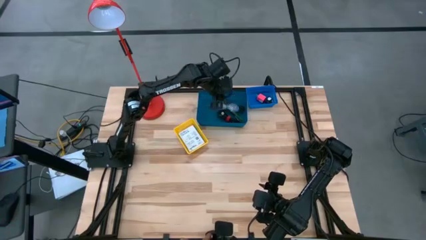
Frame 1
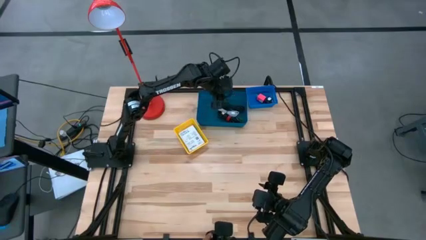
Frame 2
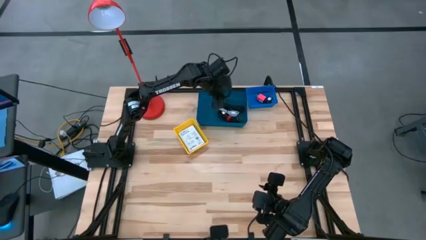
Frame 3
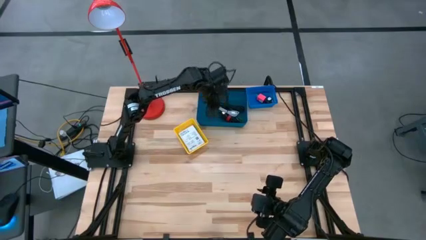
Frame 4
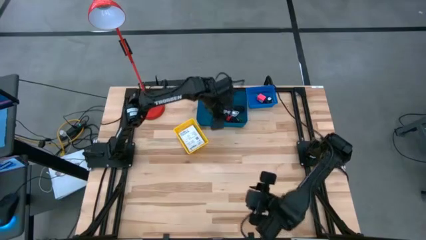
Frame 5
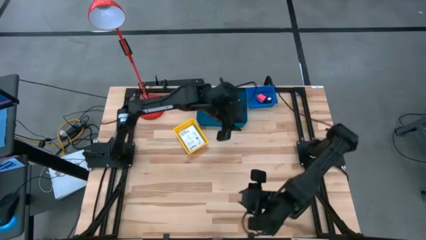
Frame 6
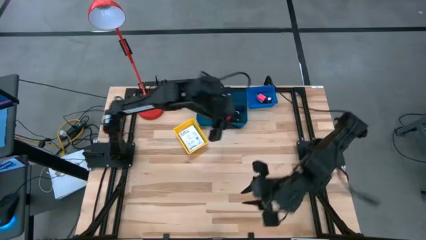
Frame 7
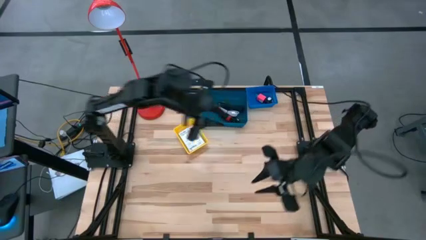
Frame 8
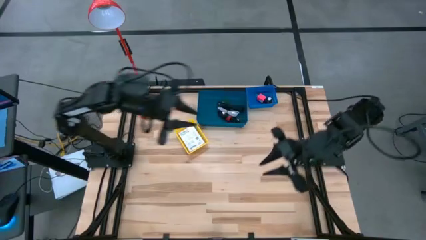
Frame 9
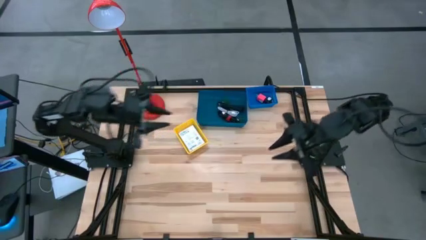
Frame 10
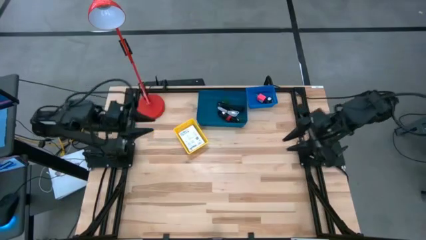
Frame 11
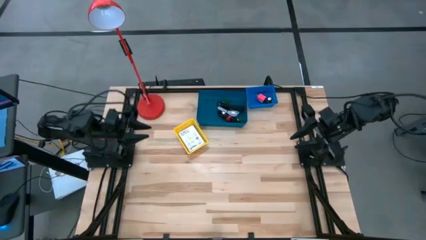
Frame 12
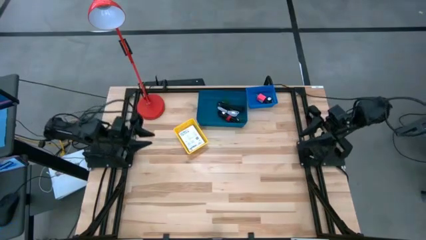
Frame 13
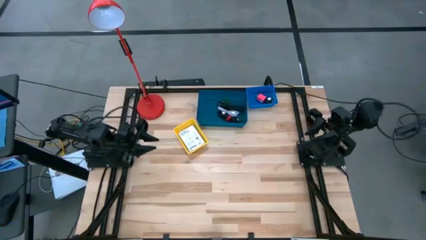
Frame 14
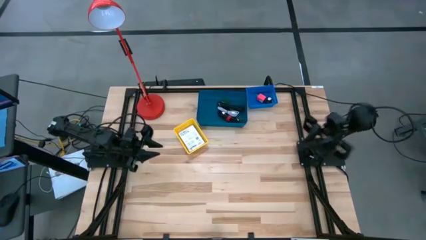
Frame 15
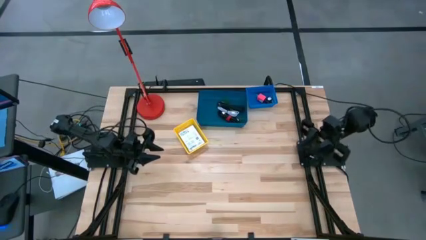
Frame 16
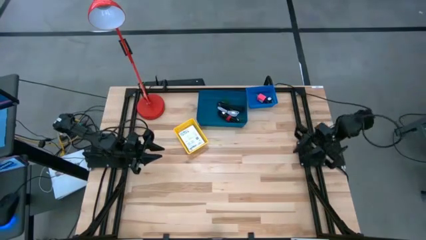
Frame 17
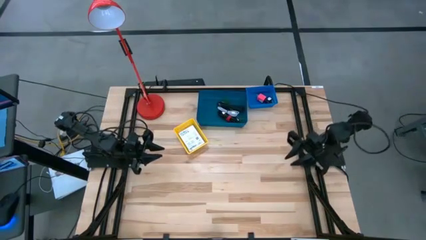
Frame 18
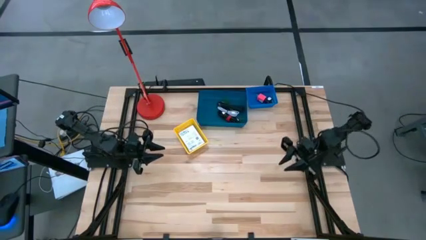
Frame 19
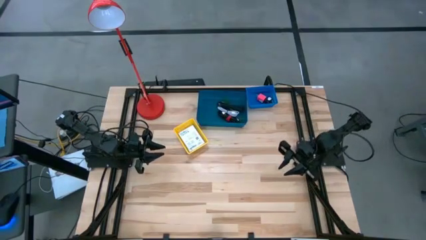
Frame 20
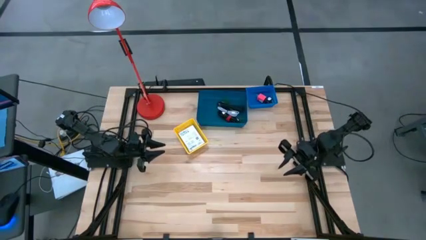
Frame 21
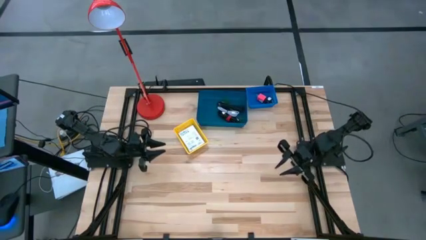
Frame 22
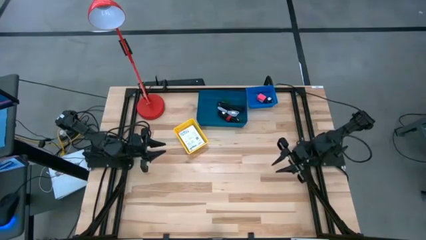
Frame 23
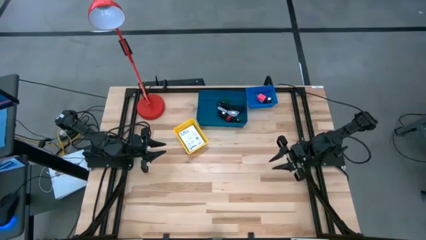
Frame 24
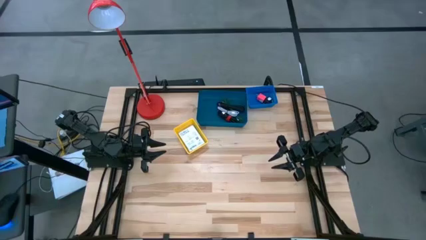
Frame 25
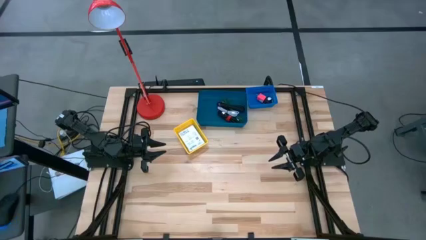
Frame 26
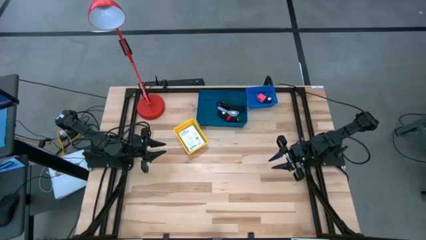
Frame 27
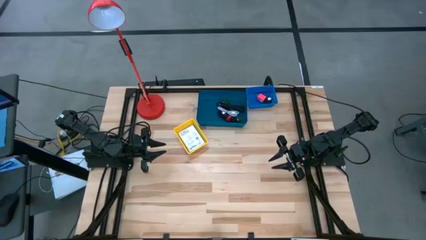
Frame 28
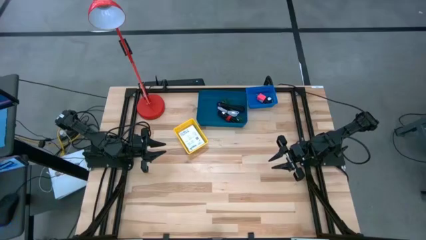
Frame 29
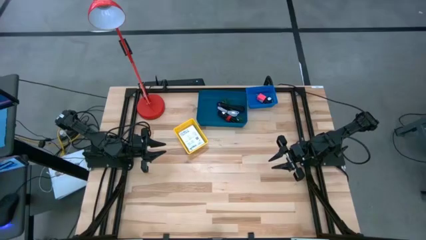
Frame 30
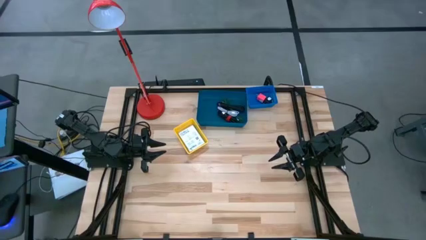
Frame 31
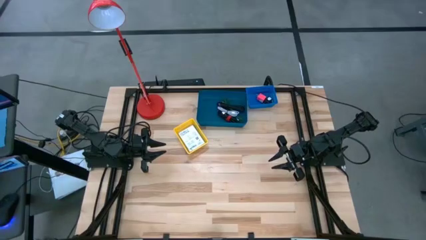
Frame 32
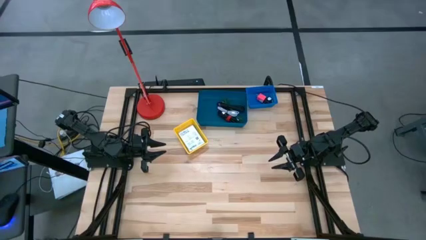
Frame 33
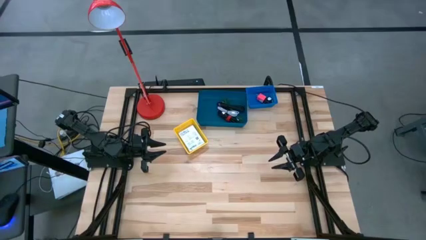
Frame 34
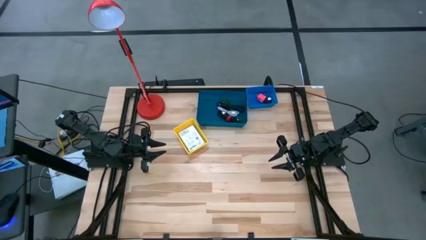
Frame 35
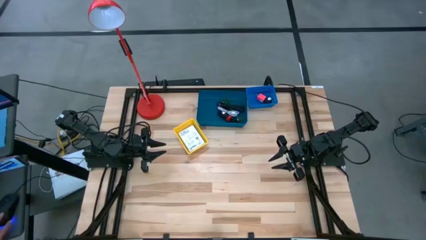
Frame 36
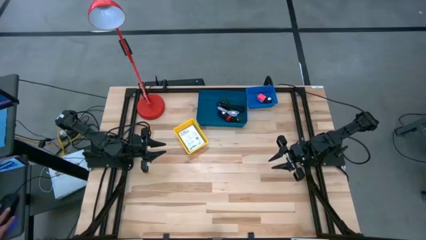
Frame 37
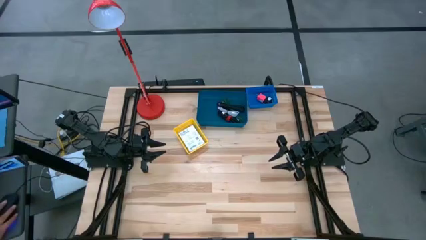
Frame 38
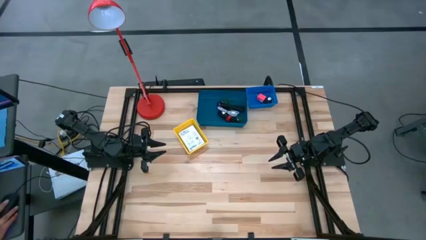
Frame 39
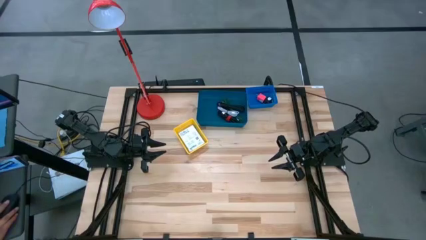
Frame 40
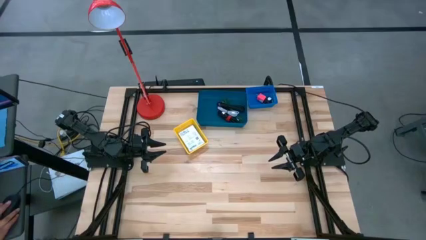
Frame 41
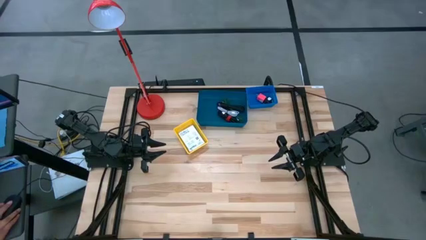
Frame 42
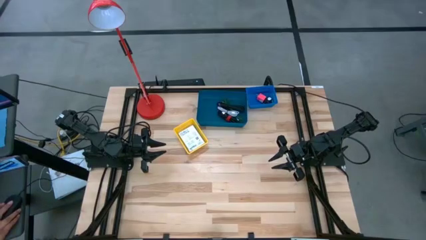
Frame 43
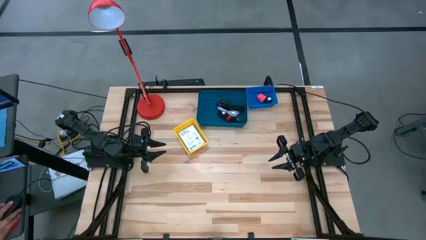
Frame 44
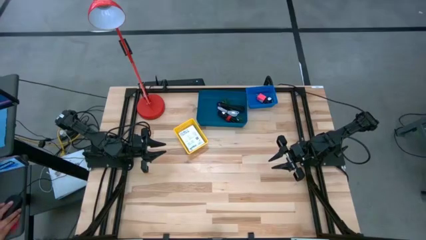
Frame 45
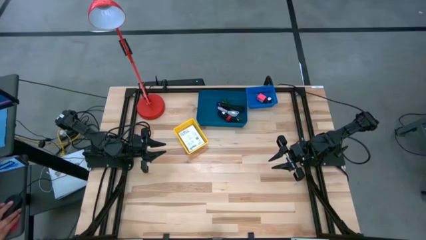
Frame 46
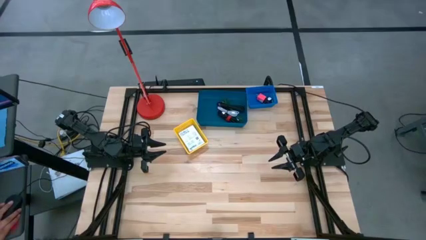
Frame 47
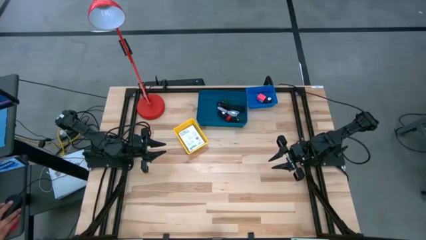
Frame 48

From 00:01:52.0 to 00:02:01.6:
Task: Pick and place items into bin
Return to Home Position

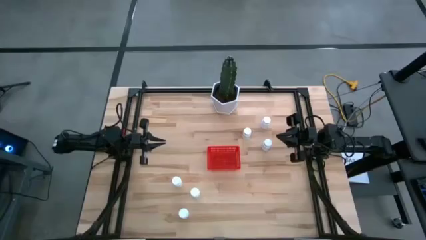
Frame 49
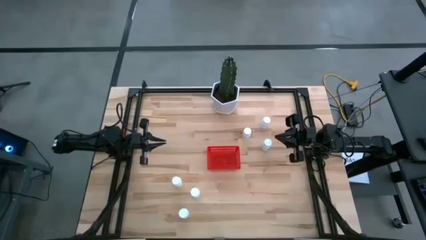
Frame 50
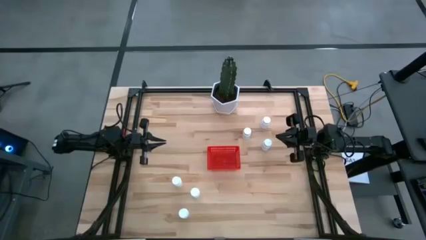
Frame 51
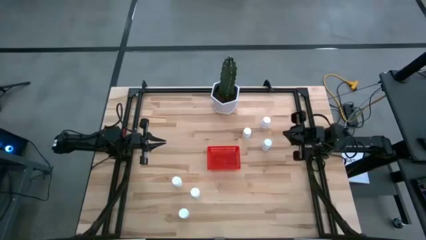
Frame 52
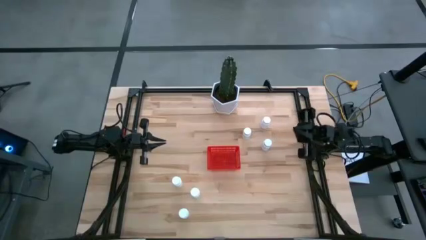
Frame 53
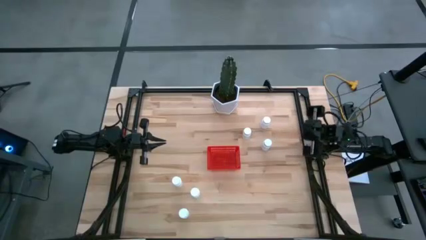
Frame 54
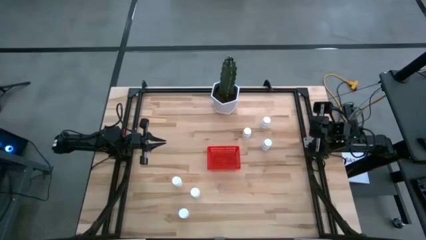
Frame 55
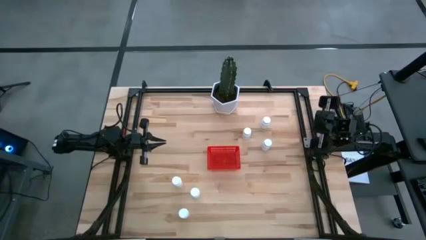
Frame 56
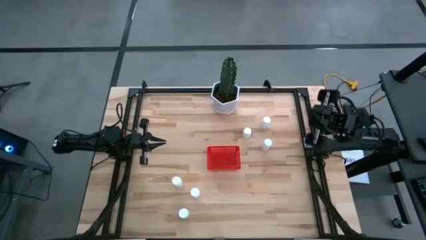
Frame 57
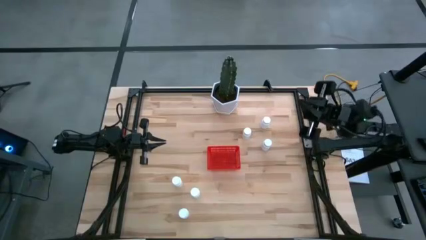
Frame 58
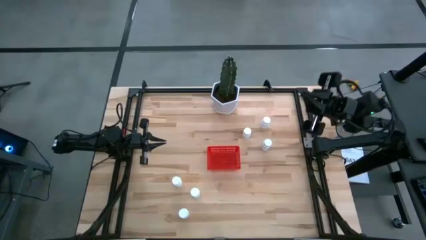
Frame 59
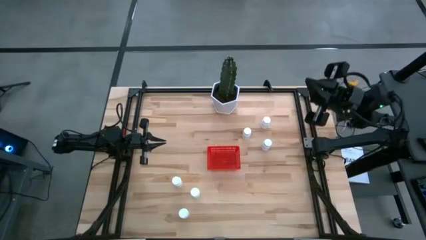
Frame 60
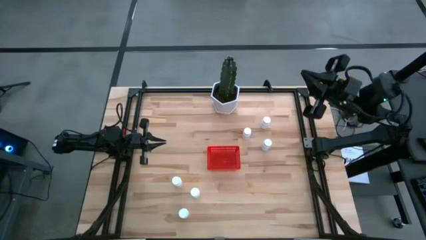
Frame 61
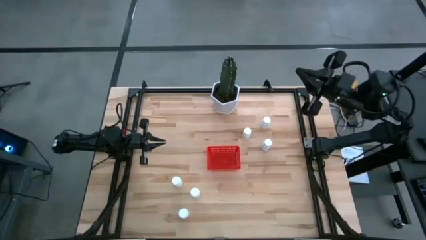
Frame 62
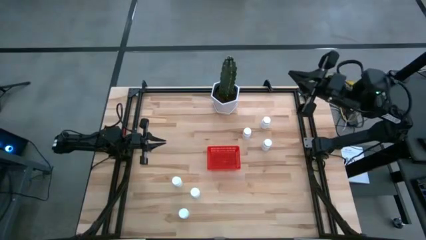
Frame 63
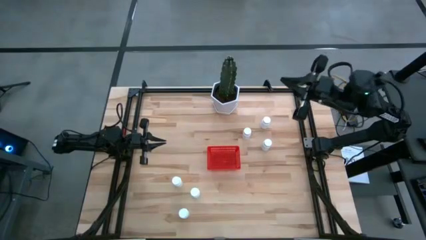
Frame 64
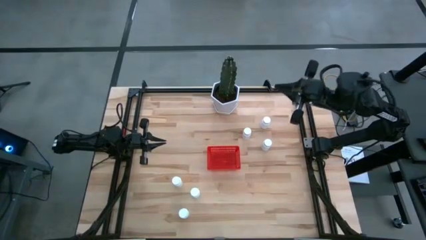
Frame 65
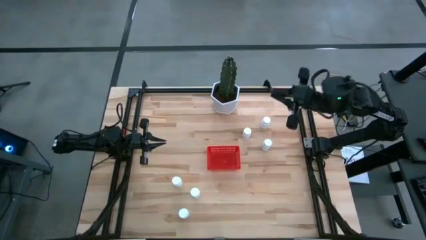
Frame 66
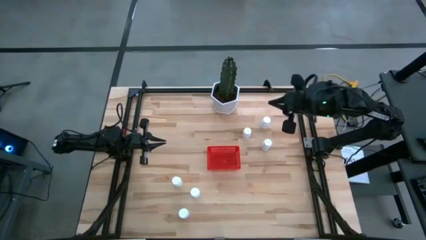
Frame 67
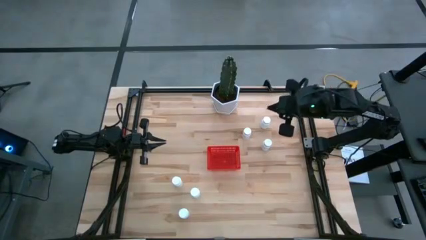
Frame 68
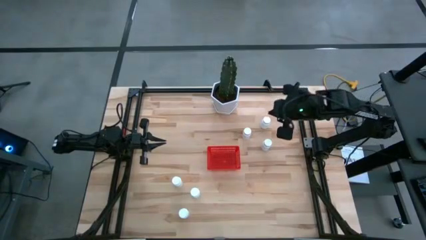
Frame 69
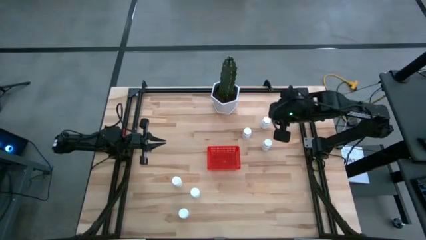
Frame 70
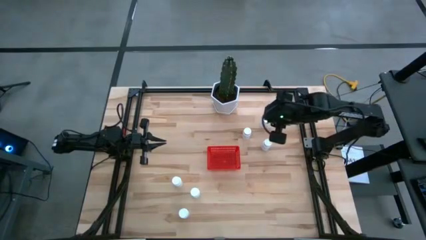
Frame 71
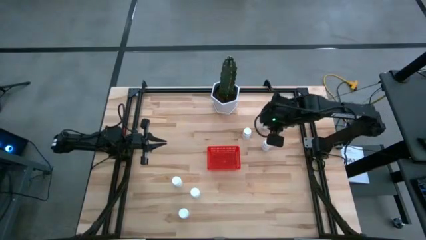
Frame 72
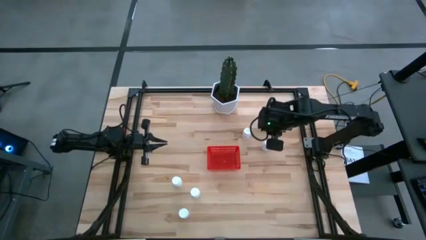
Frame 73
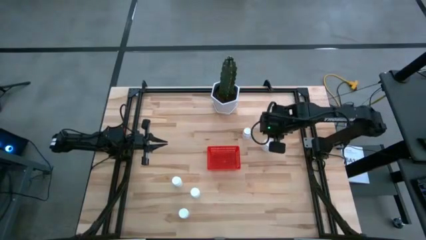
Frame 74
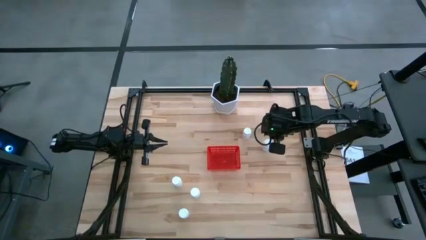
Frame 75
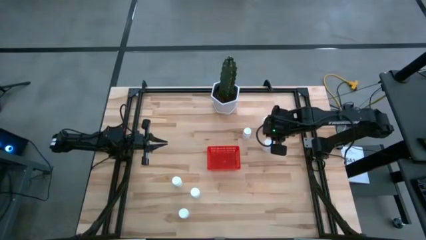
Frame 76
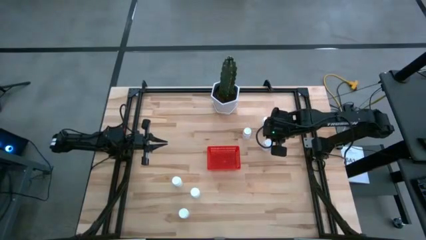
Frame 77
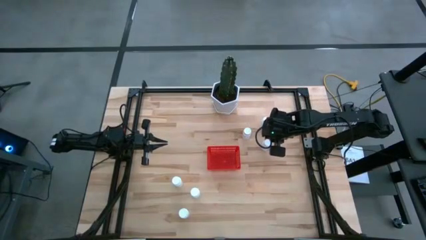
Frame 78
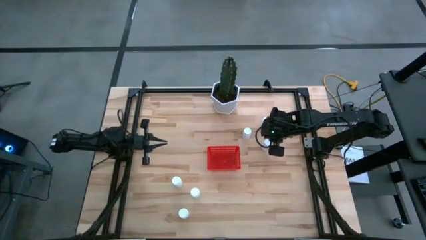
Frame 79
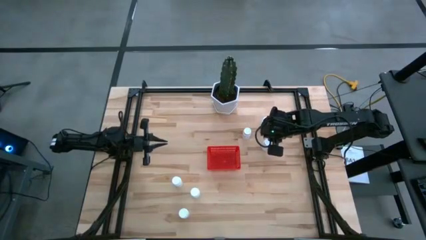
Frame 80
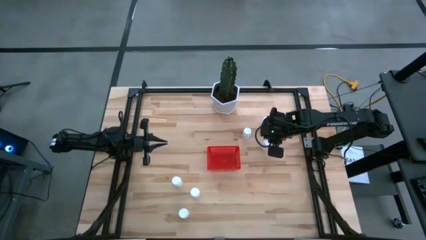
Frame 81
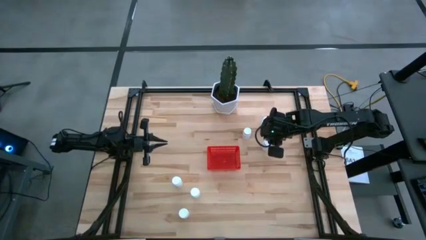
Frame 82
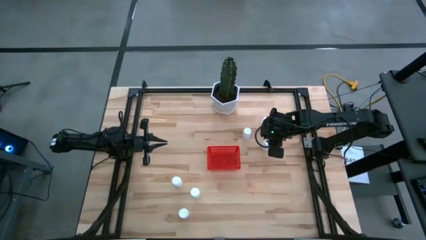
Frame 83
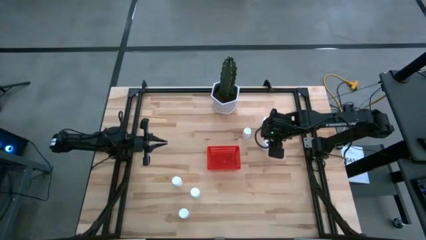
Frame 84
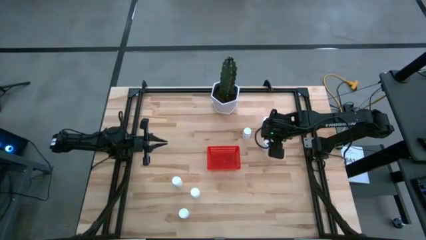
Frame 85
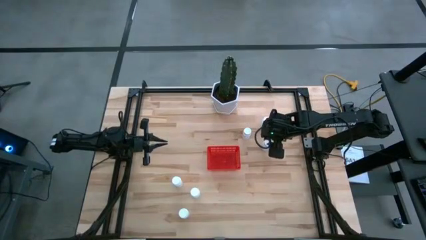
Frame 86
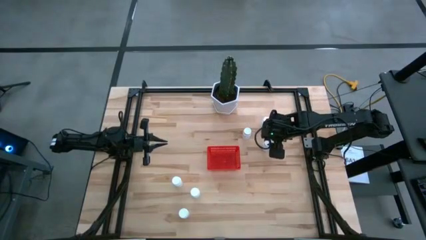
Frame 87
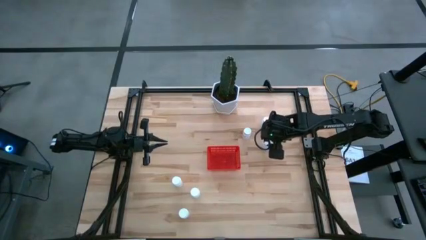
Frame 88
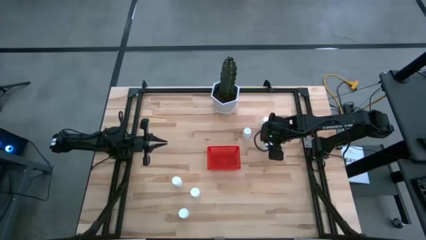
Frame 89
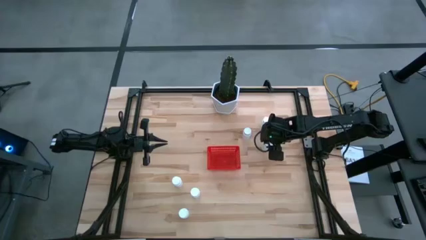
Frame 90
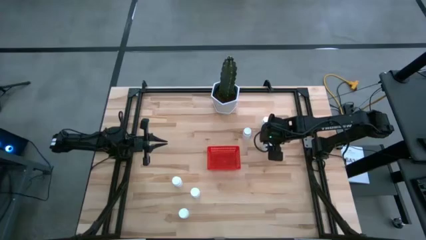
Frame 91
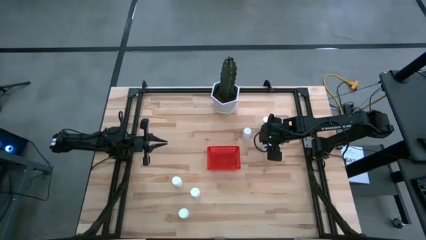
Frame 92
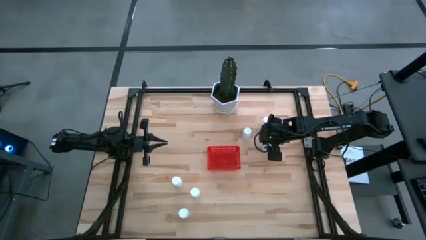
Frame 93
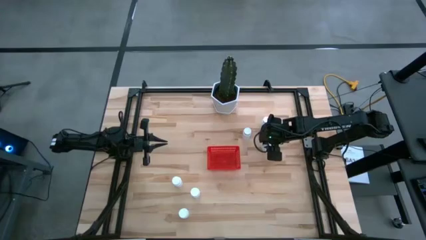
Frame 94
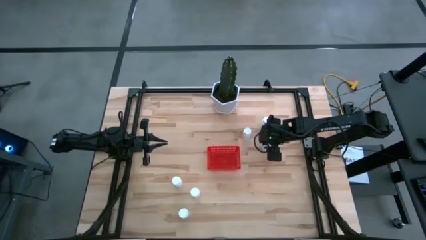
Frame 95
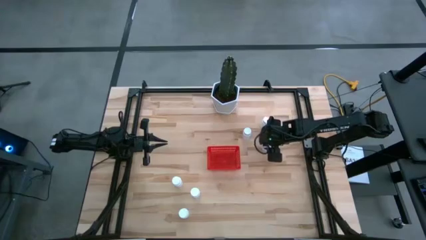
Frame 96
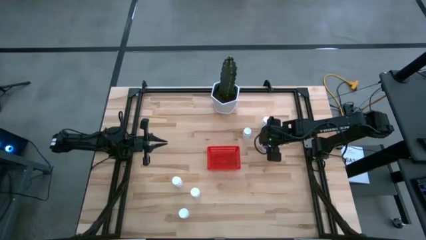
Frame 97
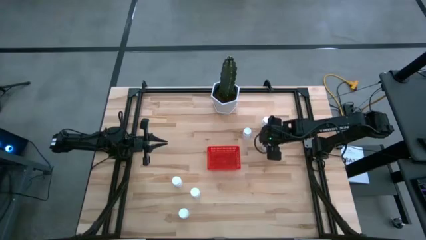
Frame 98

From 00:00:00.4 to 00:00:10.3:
Task: Pick and place pill bottles into a basket
Put the white pill bottle into the red bin
